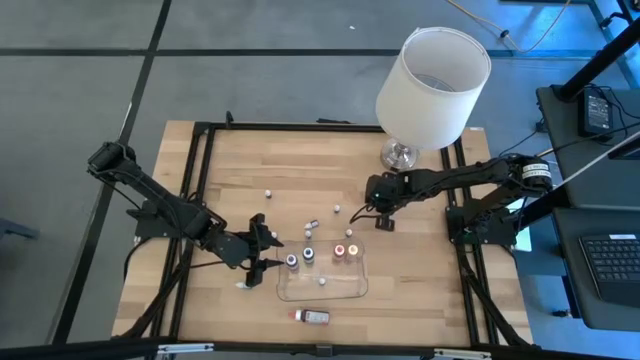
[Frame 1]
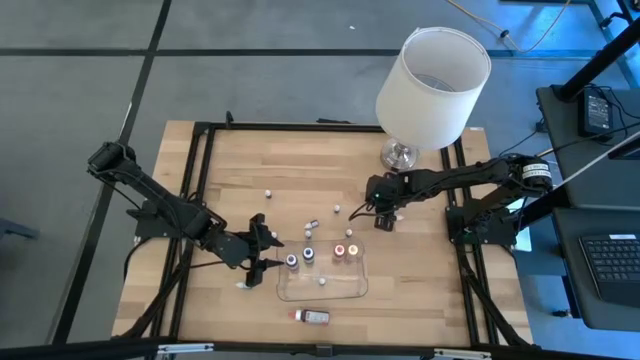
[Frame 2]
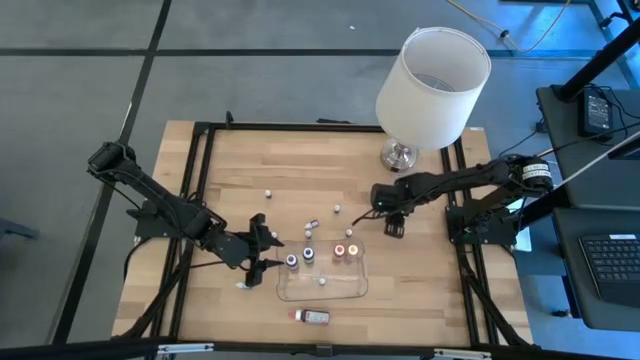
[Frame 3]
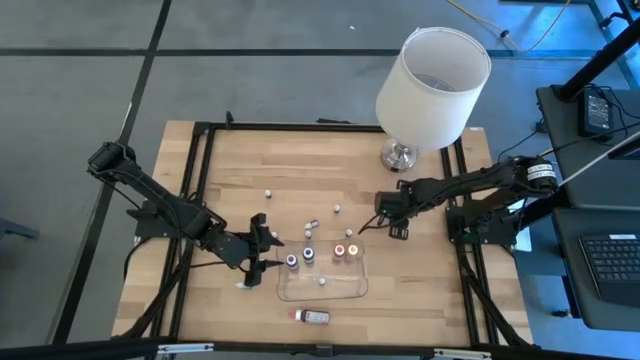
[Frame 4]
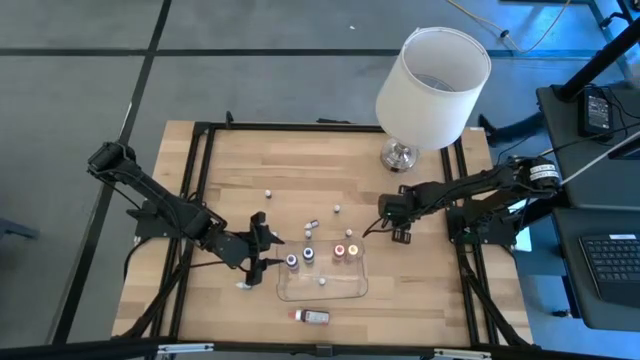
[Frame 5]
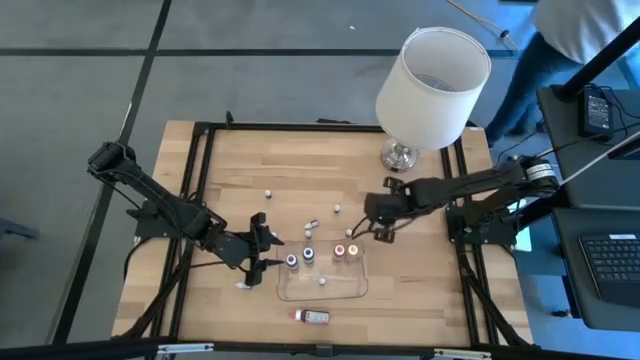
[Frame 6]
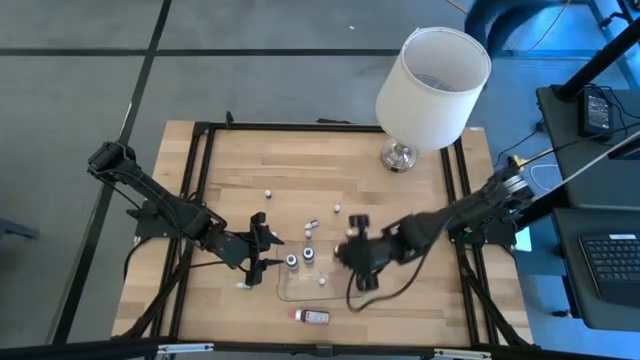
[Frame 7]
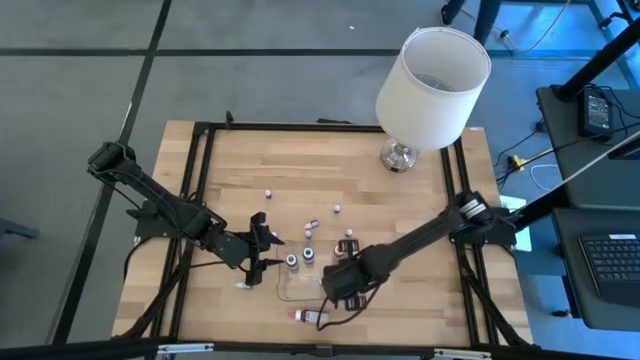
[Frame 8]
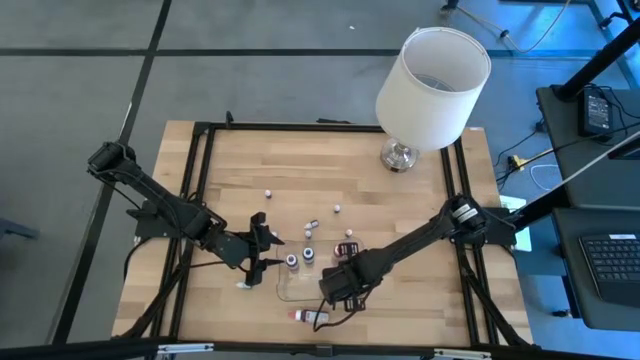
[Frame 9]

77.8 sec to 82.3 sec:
Task: Pick & Place food coloring
Put the small green food coloring bottle into the container

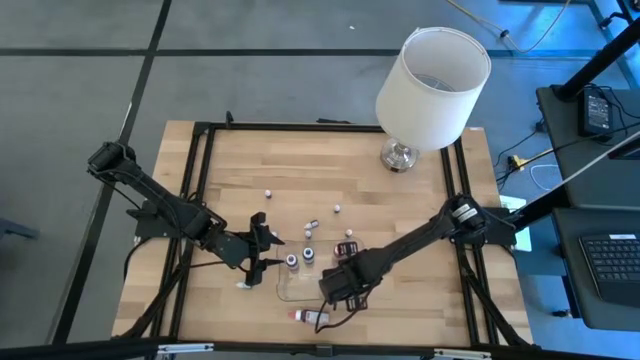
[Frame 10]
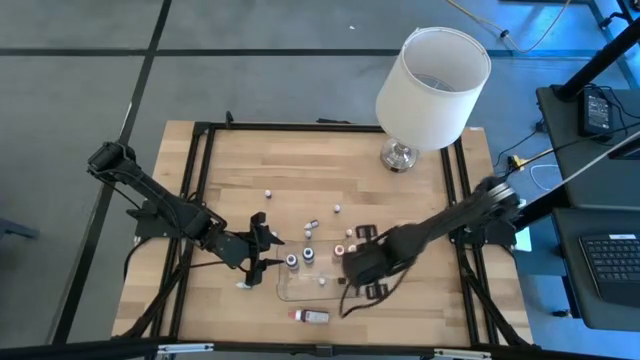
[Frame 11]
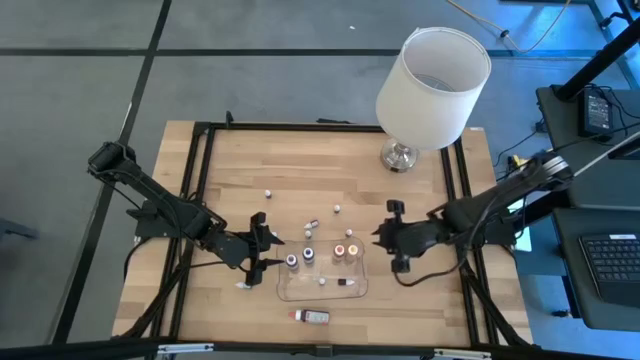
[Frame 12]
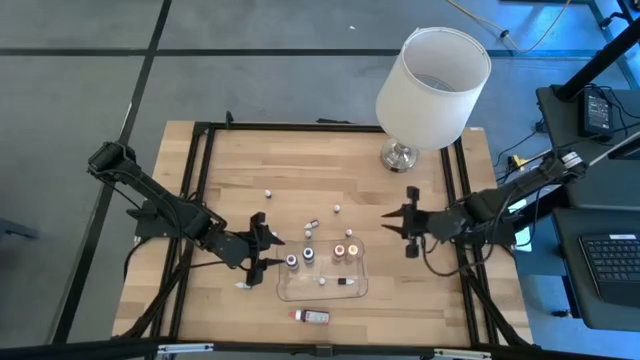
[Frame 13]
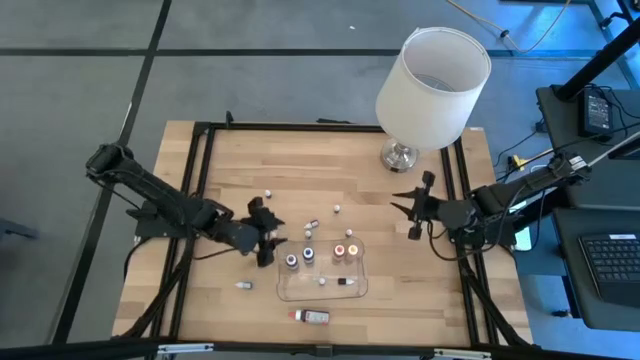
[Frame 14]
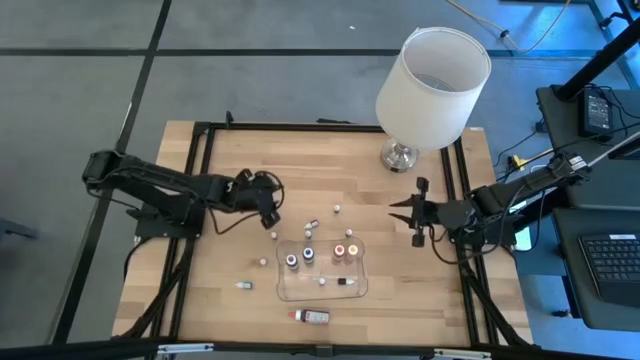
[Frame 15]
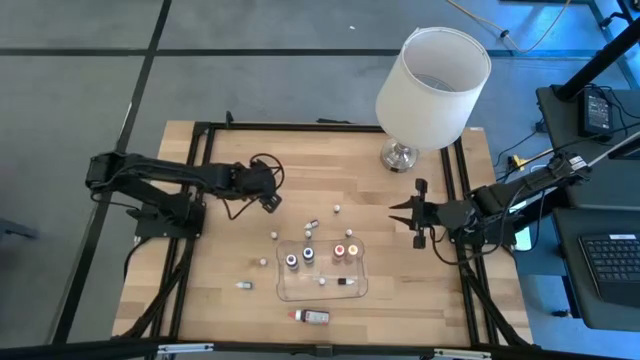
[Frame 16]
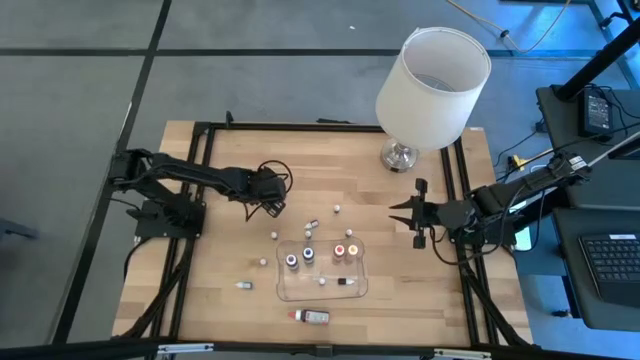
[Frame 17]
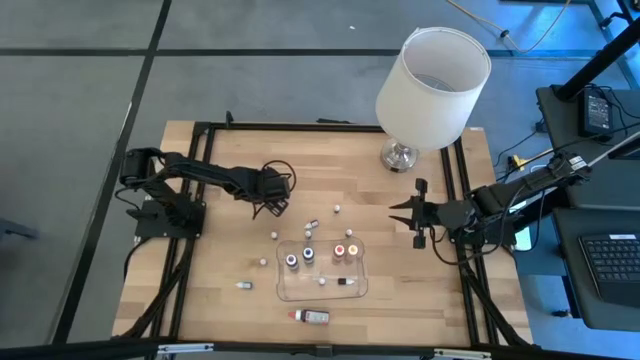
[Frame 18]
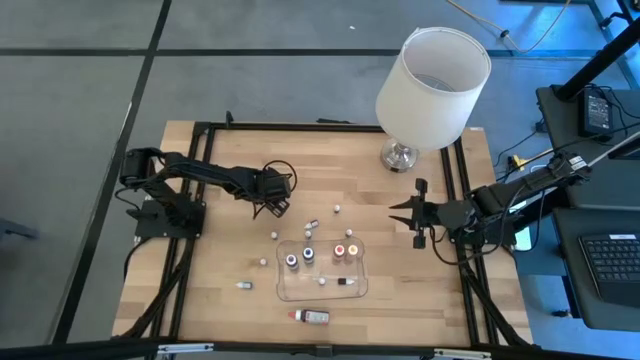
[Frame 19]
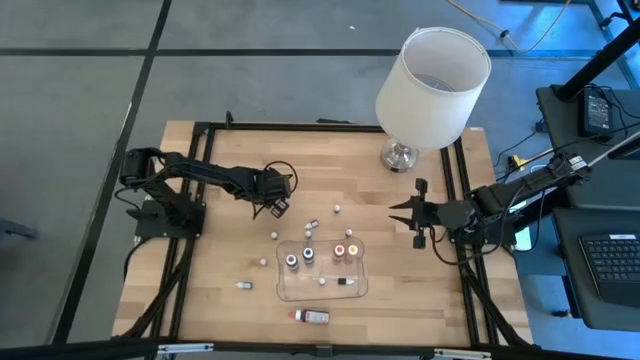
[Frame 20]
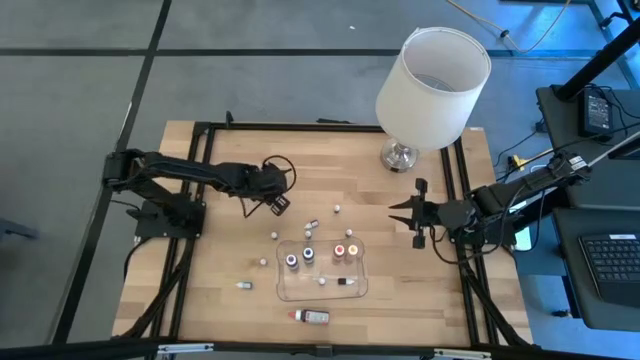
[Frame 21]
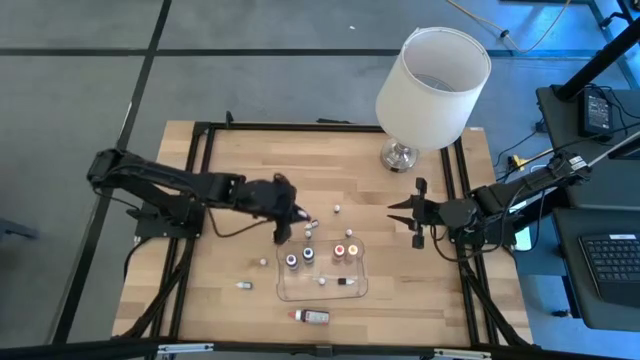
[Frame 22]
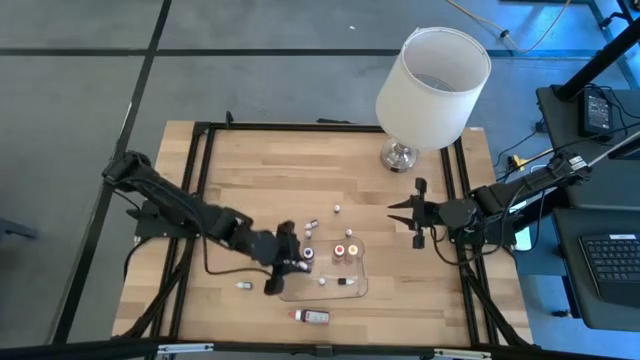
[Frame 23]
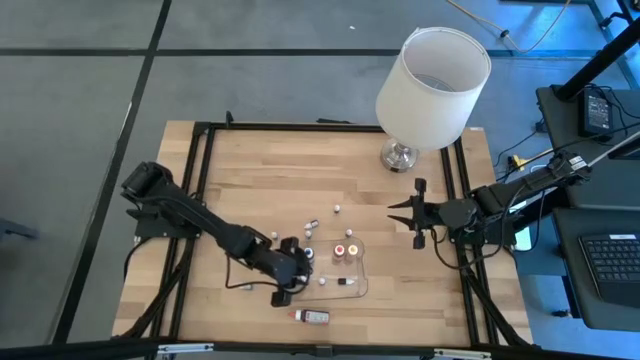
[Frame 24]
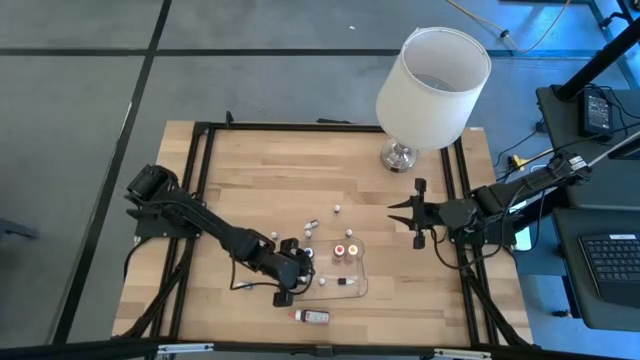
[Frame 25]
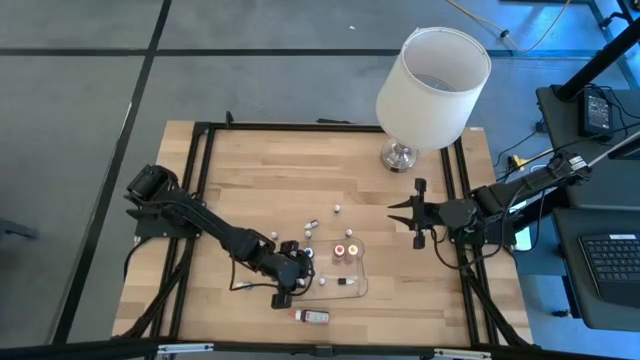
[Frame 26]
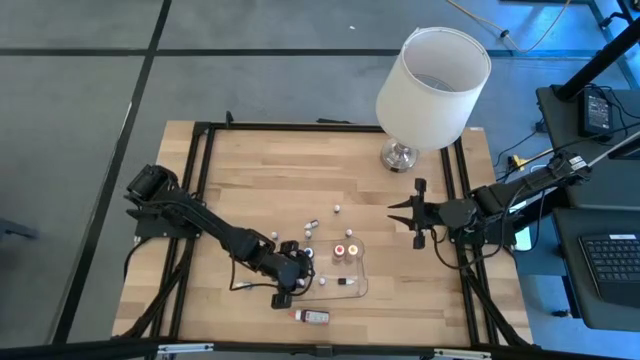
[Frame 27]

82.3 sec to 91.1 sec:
Put the small pink food coloring bottle into the container

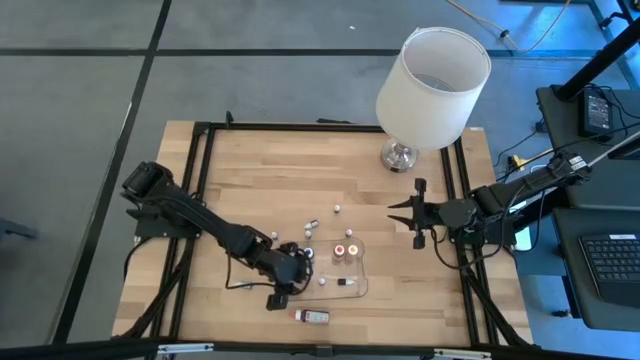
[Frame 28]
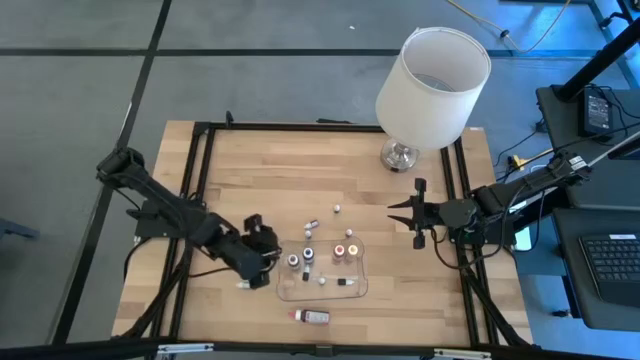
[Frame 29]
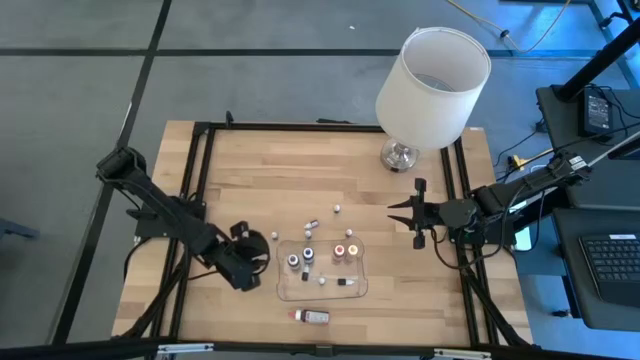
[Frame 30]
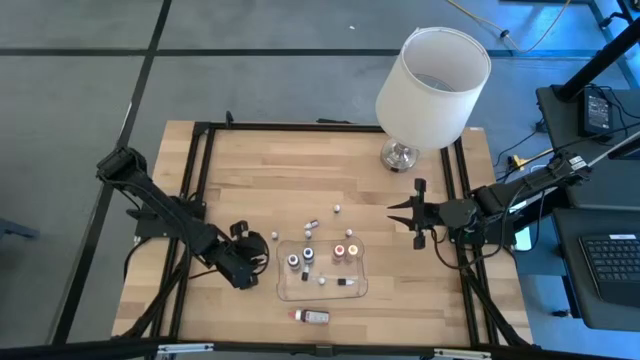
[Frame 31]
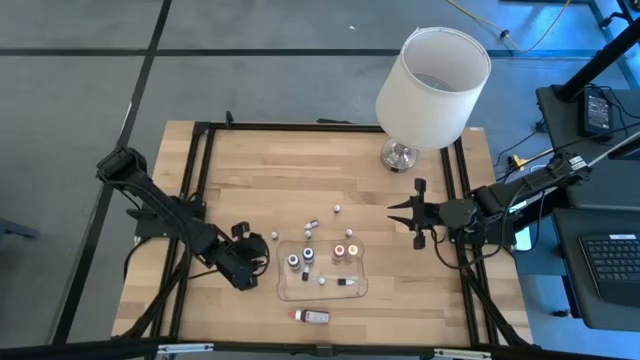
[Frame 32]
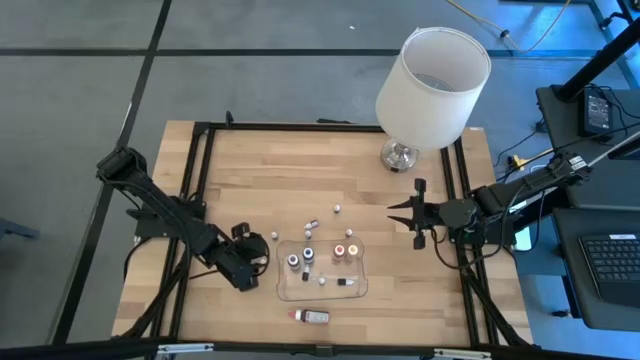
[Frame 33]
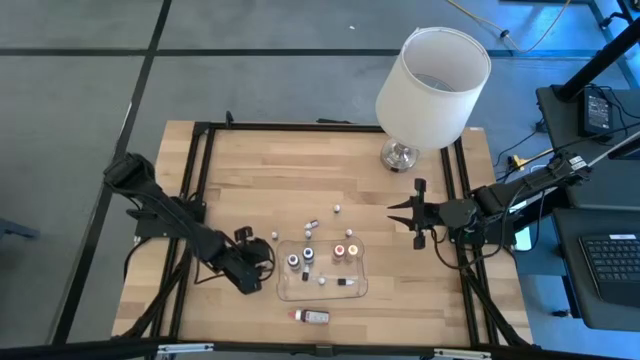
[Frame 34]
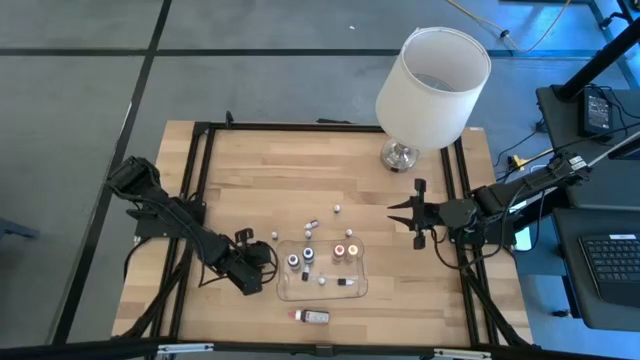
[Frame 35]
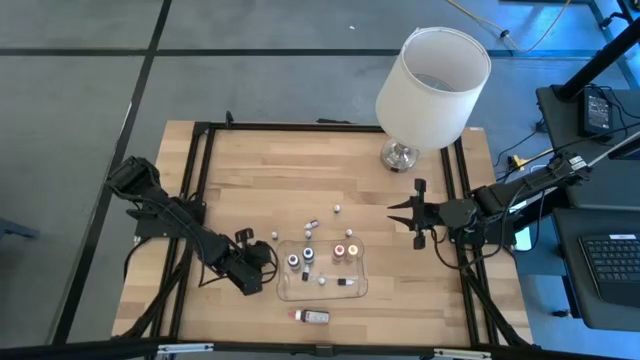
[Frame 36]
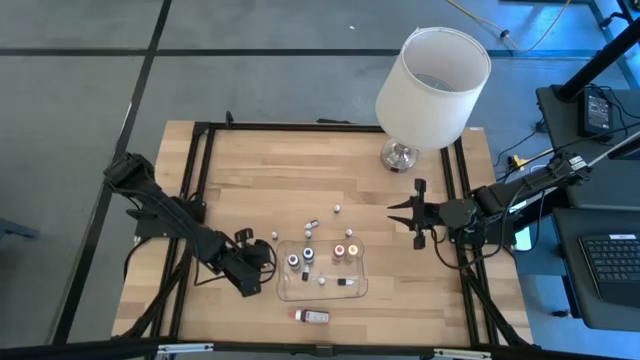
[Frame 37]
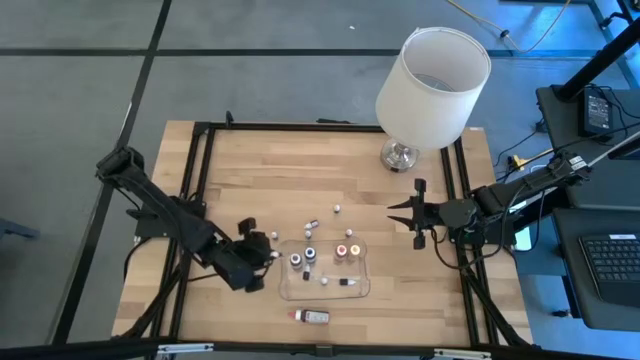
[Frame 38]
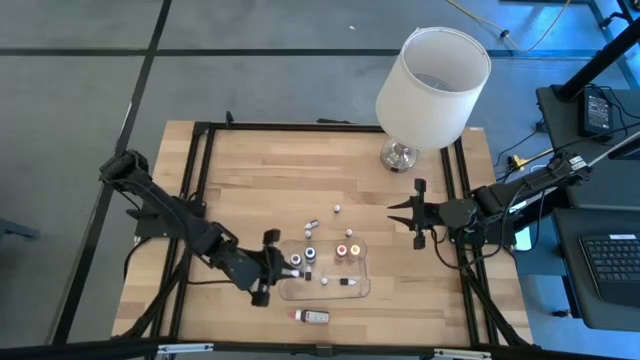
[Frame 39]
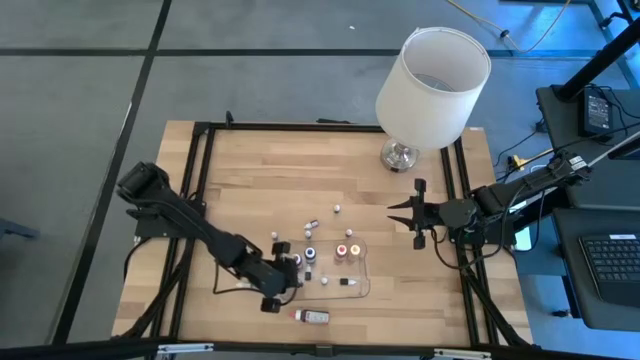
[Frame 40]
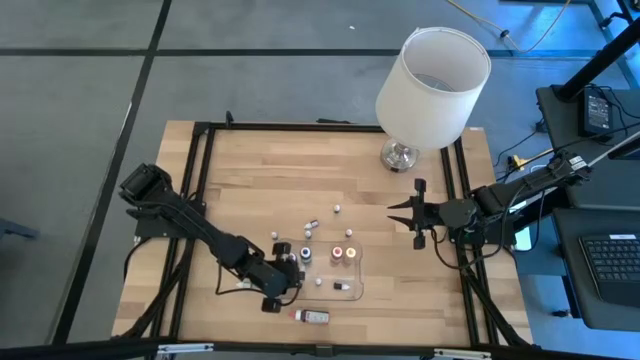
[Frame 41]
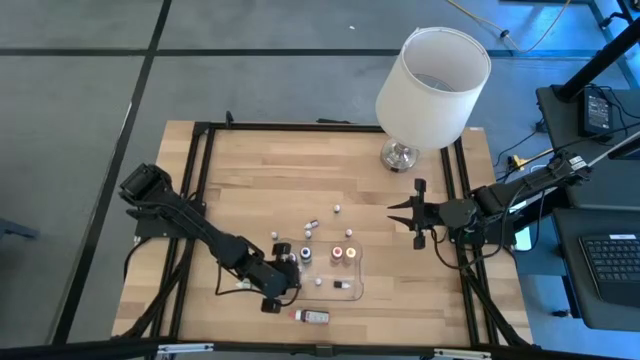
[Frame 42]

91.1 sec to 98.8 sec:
Put the small white food coloring bottle into the container

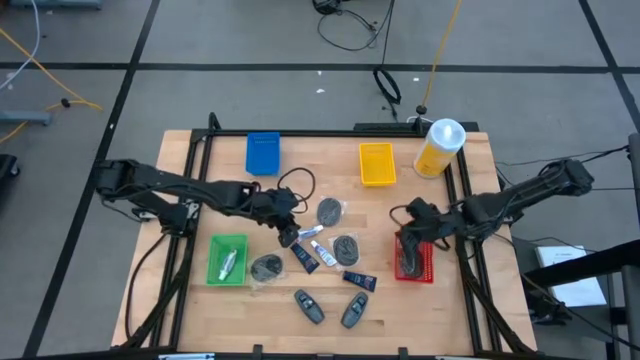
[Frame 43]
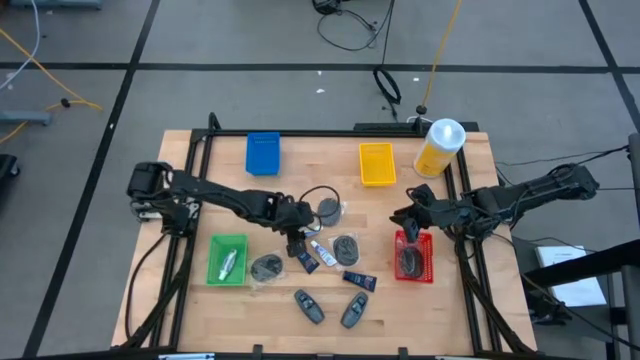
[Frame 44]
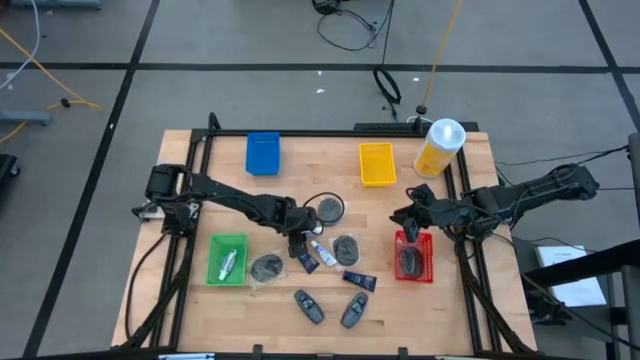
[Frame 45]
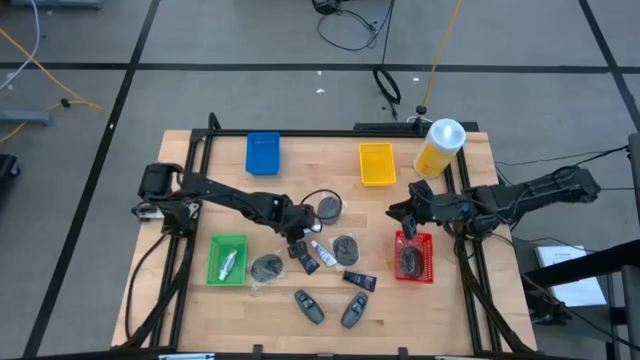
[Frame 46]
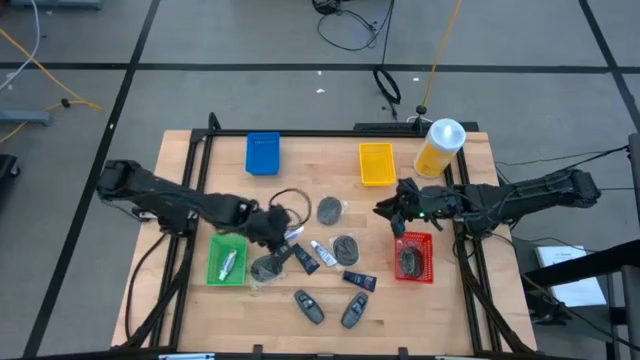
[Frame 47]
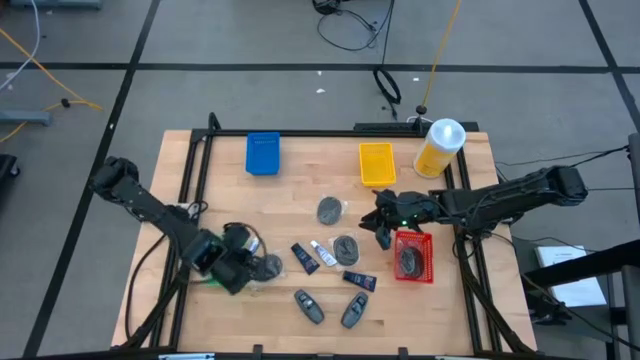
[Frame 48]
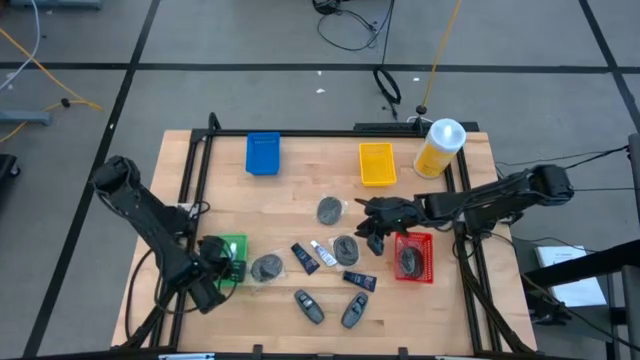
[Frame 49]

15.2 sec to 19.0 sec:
Task: Pick & Place Travel size toiletries
Put the white toothpaste into the green bin
